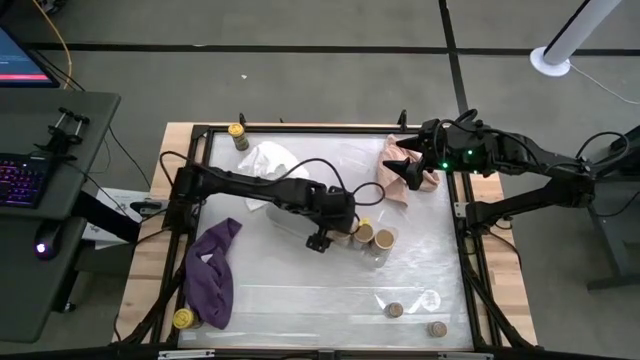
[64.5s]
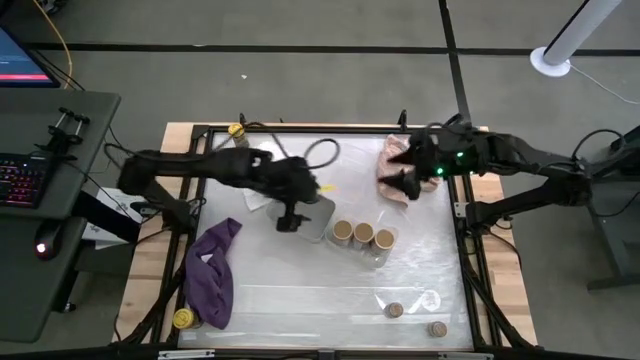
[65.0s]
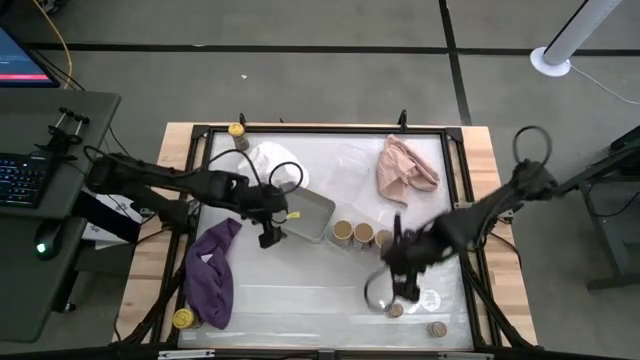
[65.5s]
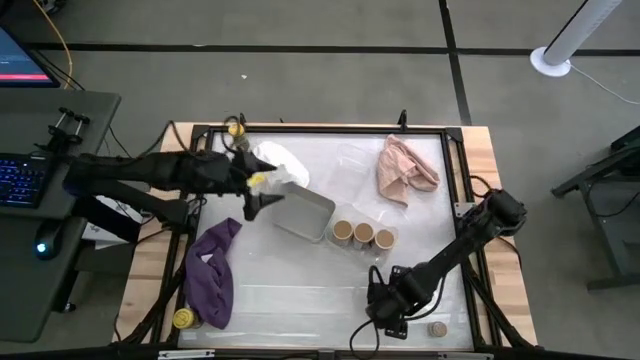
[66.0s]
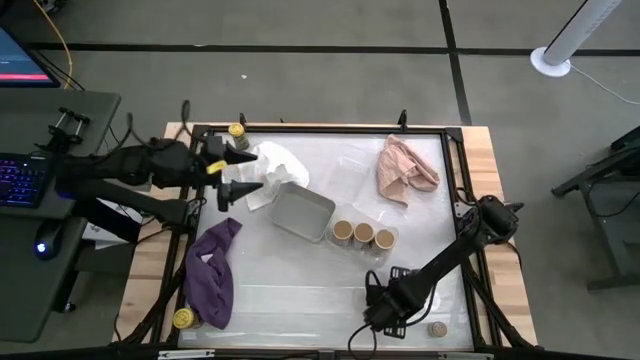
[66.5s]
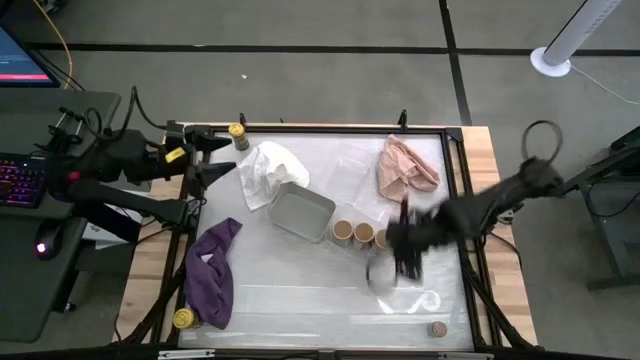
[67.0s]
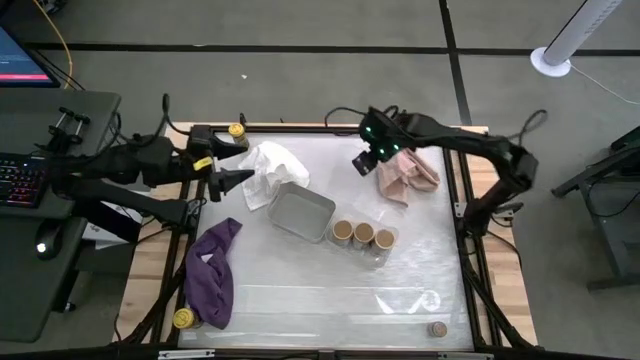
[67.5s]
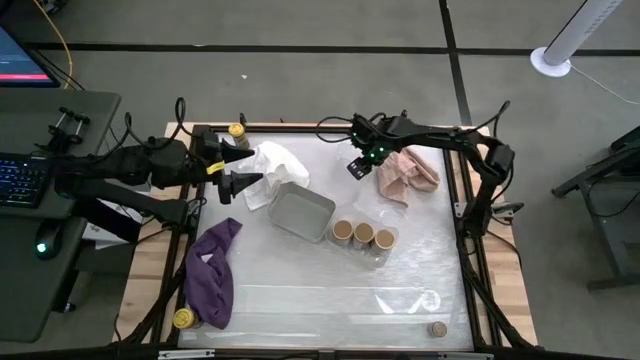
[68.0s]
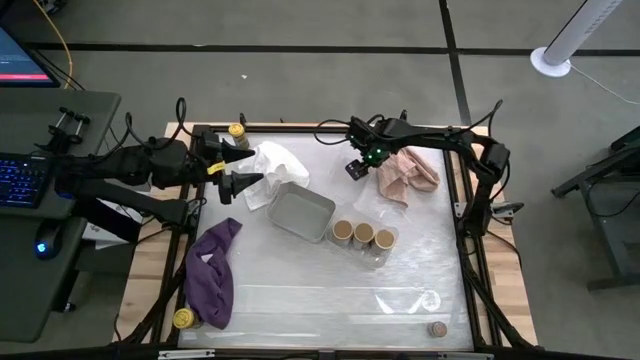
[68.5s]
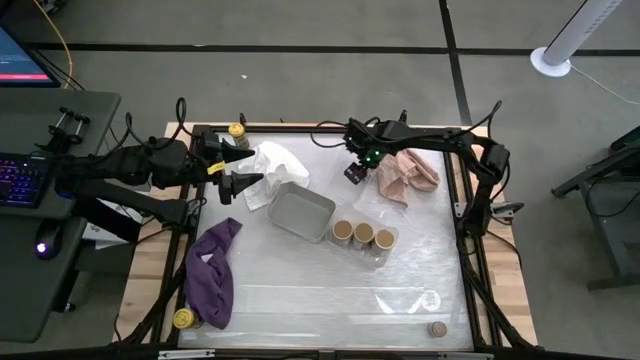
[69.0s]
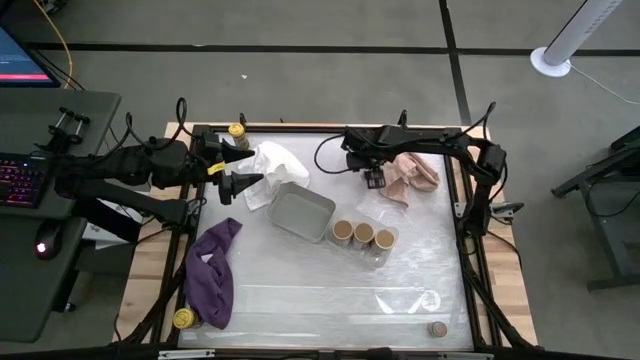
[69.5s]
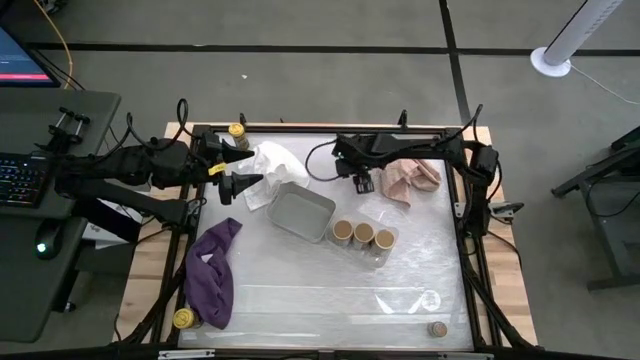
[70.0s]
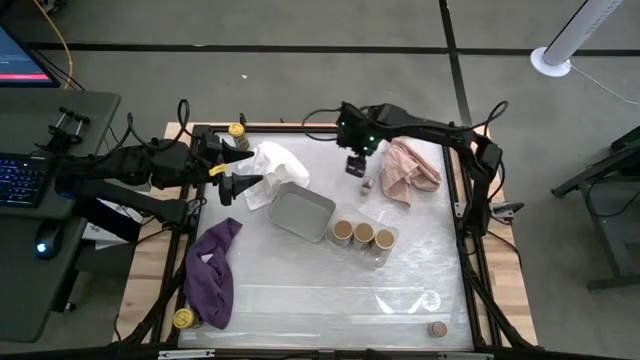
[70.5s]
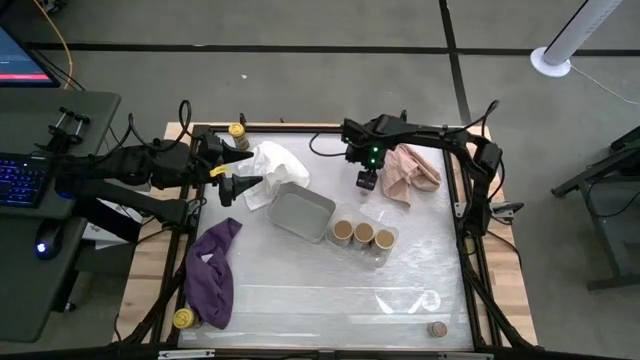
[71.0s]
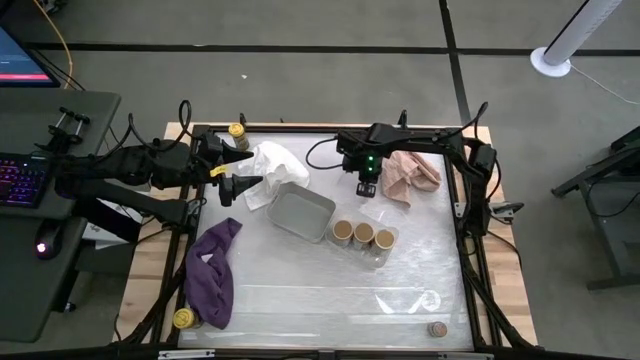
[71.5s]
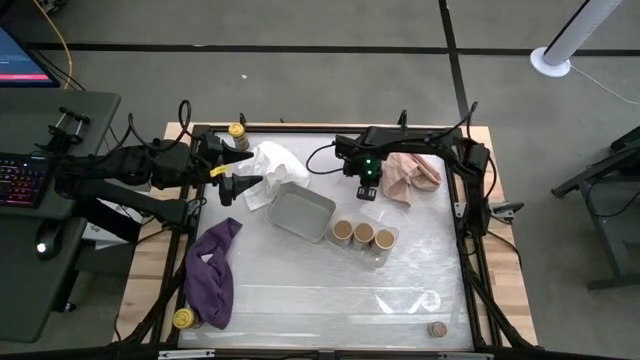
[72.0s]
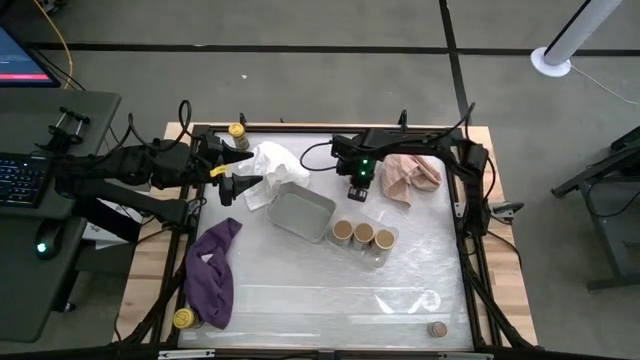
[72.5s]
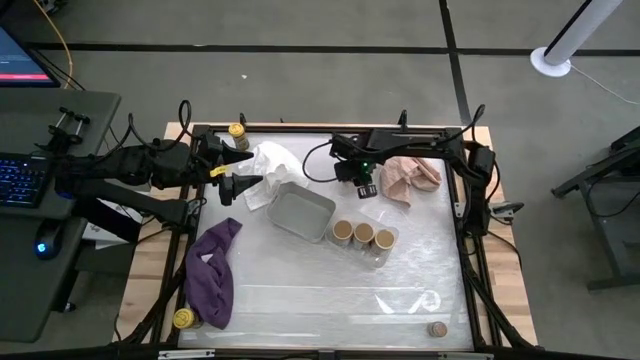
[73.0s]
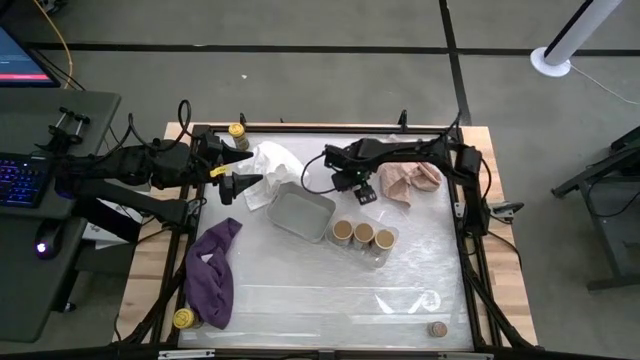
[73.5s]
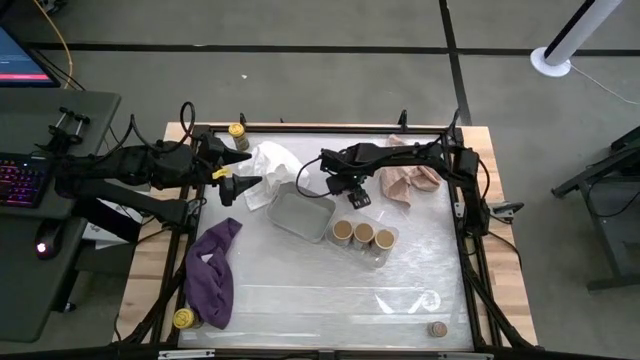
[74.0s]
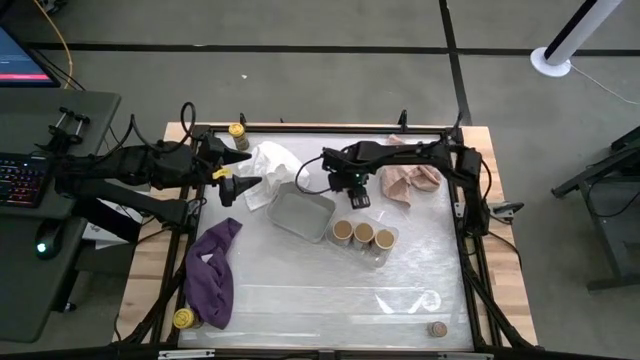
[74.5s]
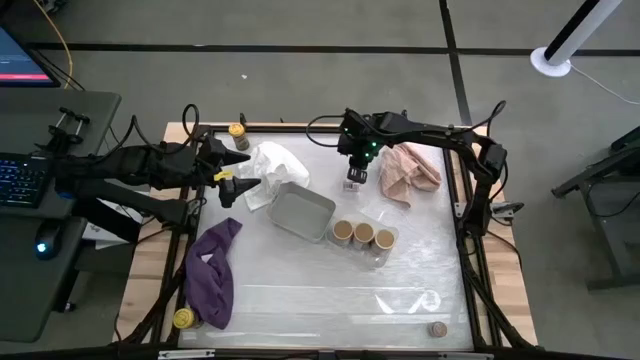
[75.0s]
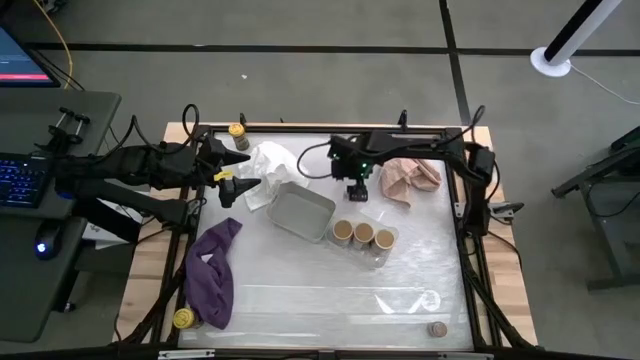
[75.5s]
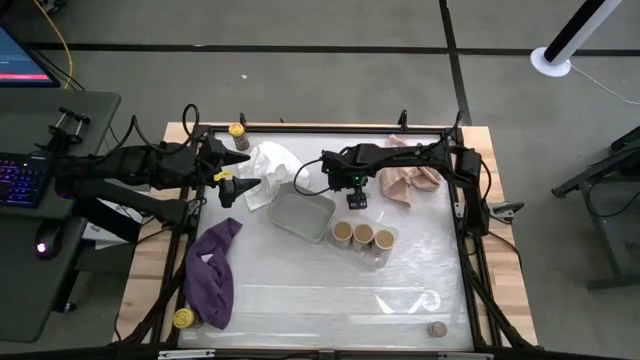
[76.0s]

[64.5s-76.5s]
Task: Sort spices by type
Put the left brown seasoning bottle into the top transparent bin

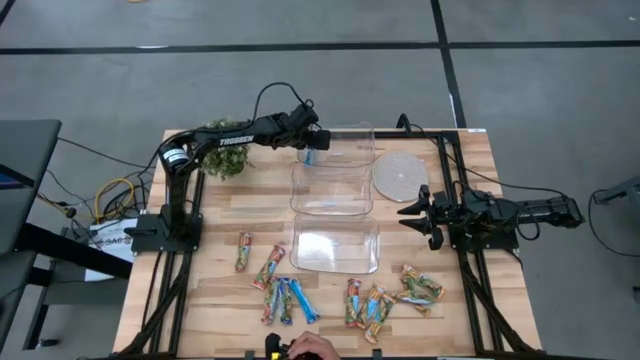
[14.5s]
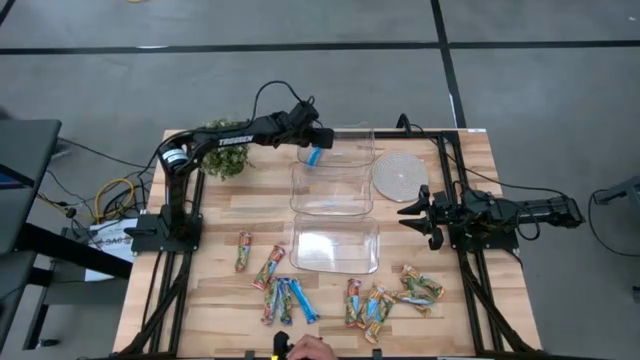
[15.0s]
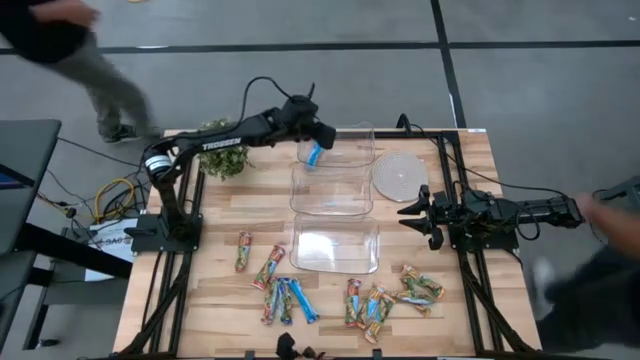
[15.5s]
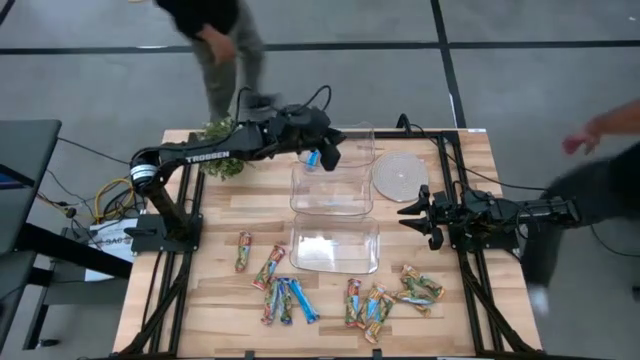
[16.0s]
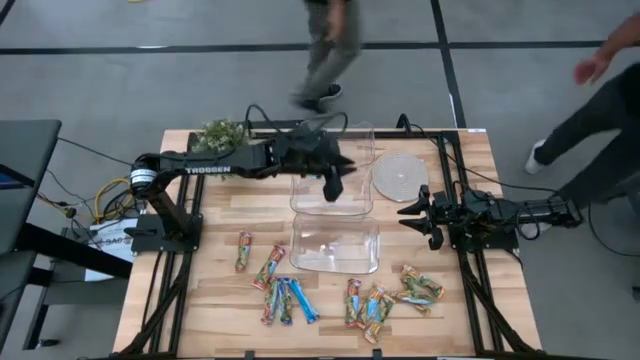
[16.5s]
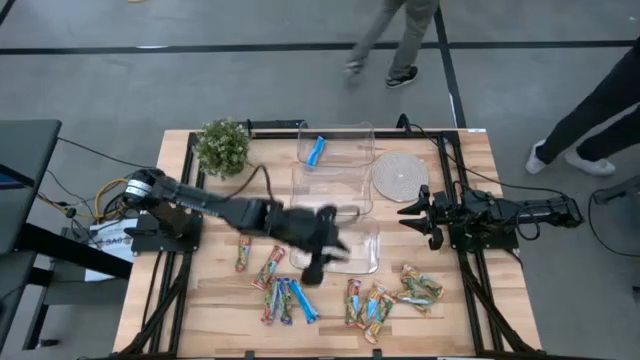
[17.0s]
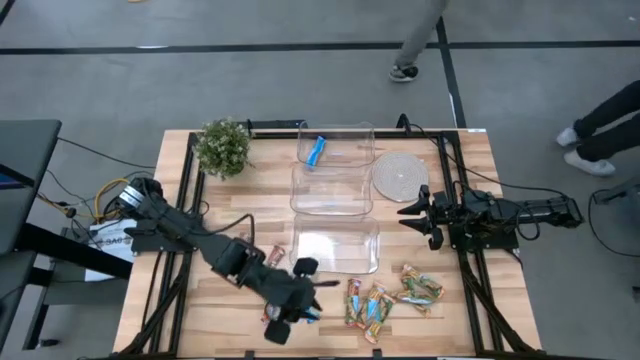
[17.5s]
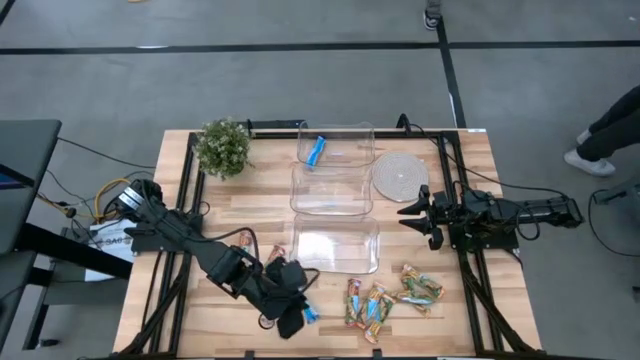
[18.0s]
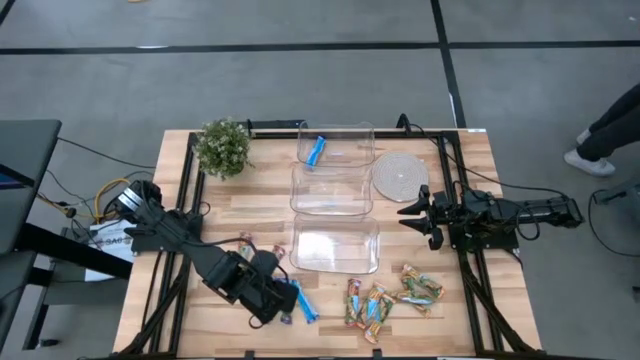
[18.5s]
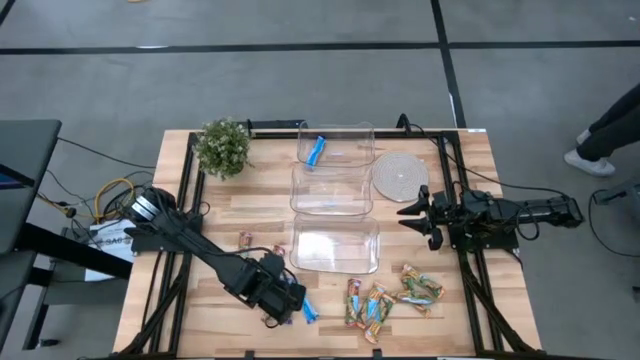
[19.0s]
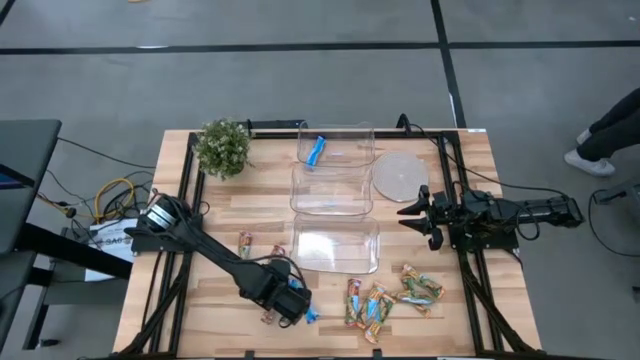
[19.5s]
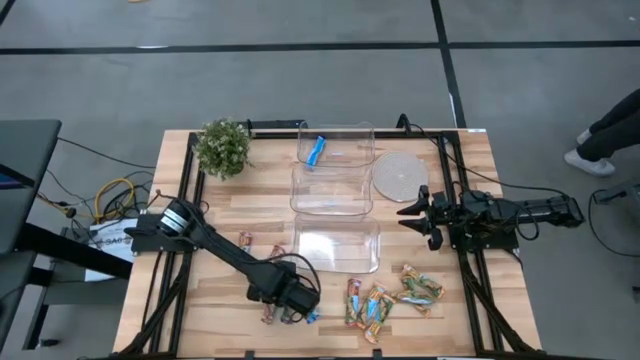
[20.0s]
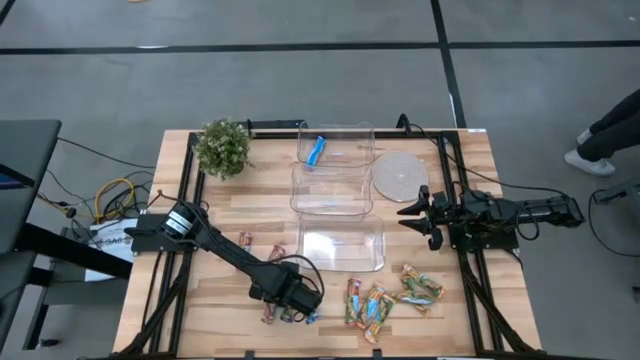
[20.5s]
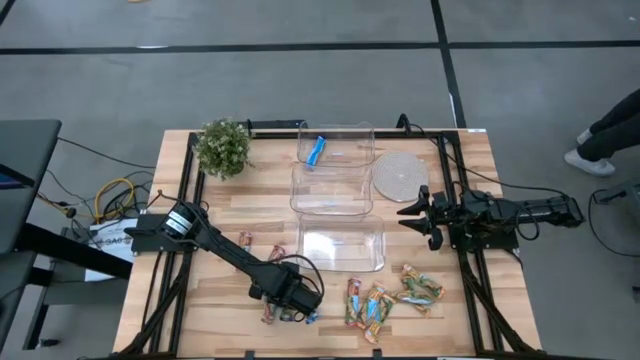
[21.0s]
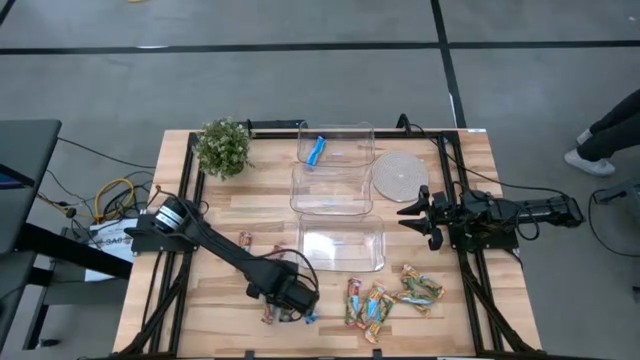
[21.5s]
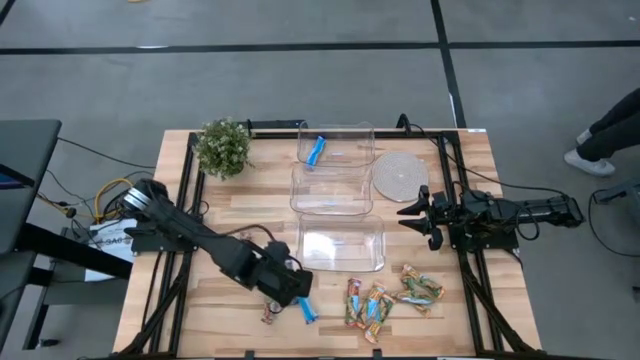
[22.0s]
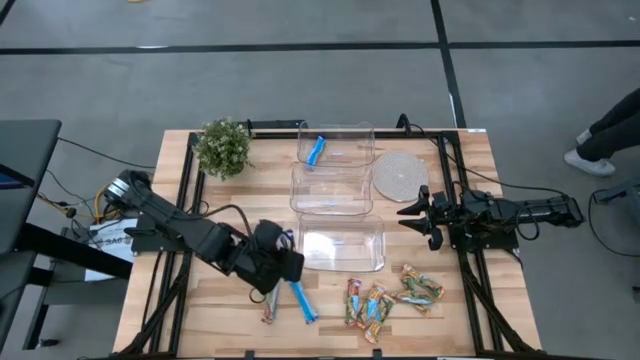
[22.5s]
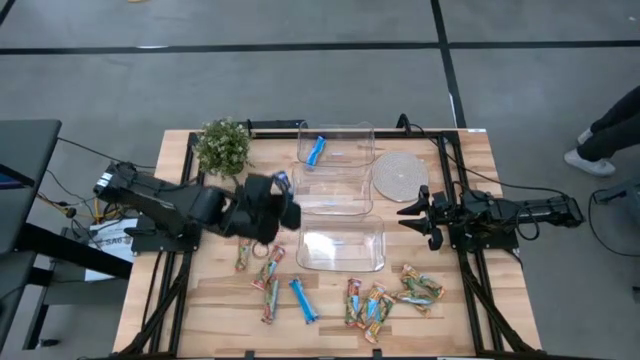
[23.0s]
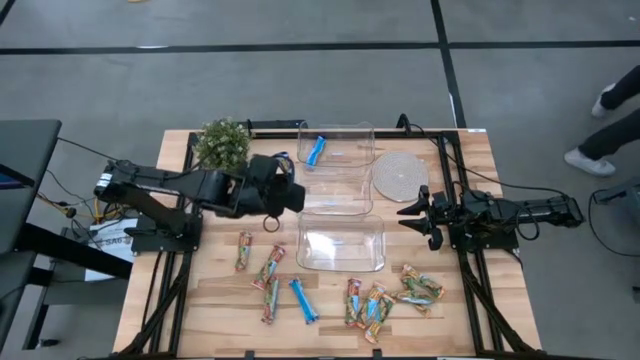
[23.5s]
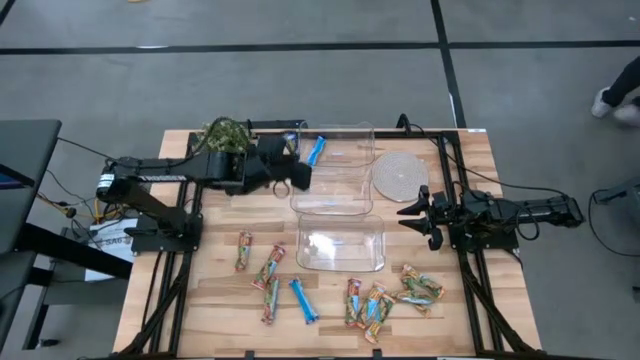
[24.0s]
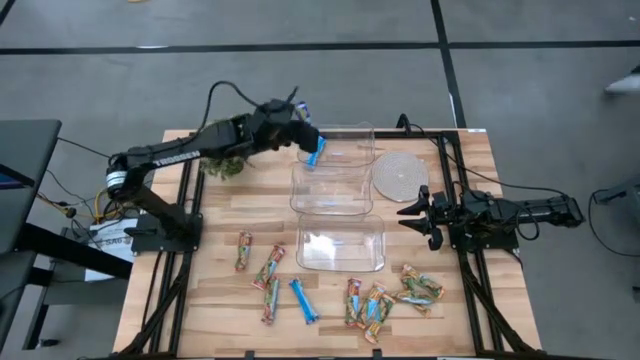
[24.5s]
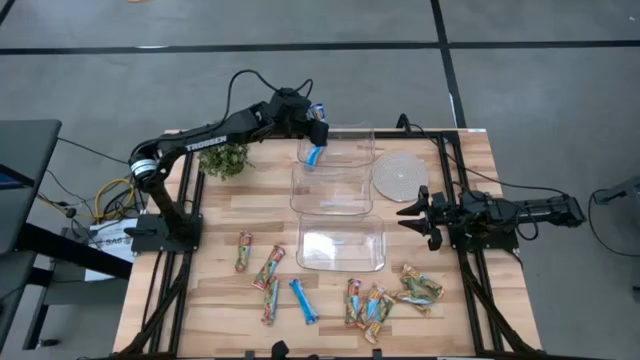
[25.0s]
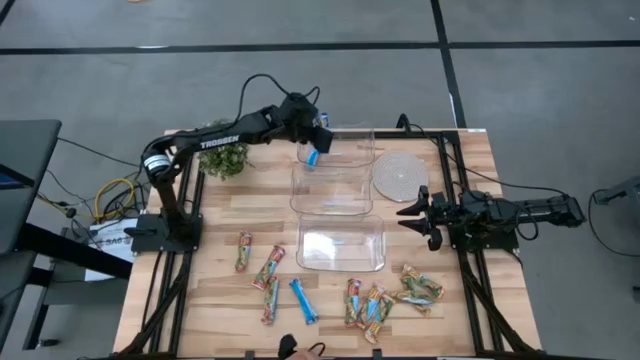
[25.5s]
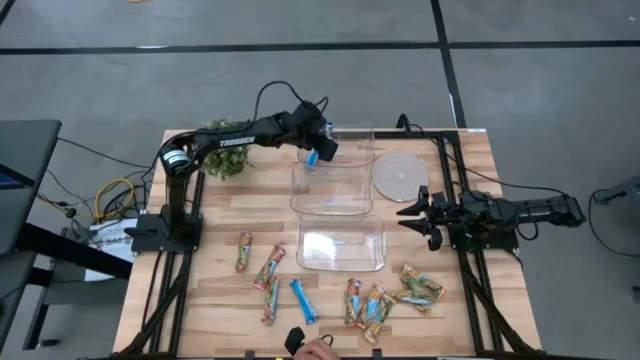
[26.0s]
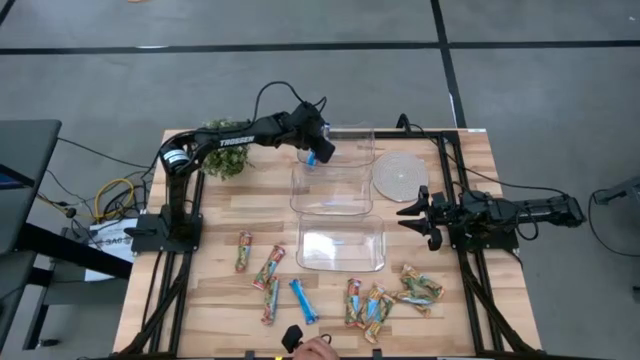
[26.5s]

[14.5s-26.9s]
Task: Pick and place Granola Bars by type
Put the blue granola bar into the top transparent bin
